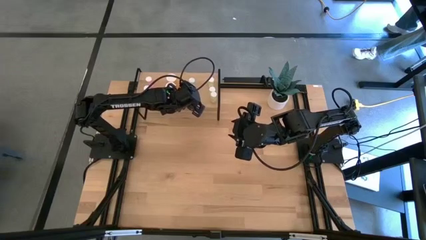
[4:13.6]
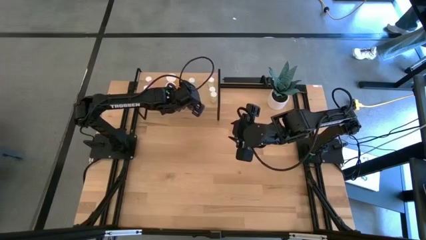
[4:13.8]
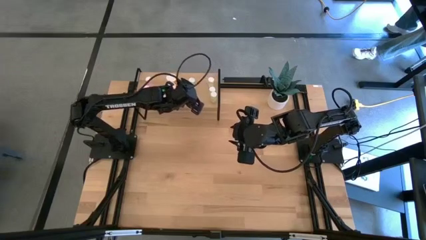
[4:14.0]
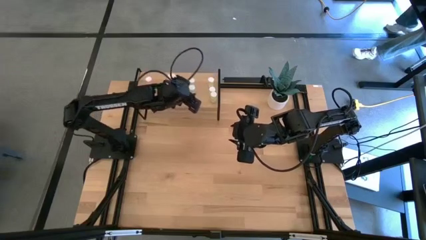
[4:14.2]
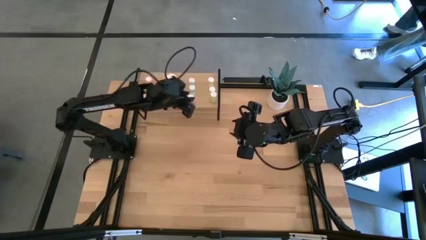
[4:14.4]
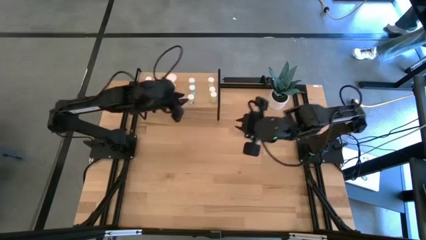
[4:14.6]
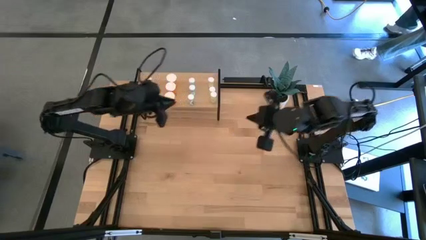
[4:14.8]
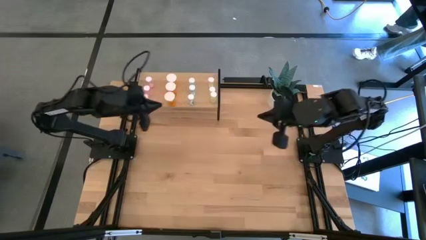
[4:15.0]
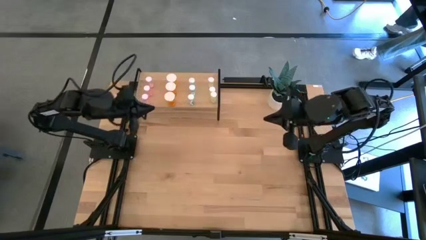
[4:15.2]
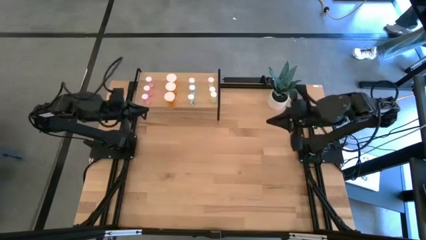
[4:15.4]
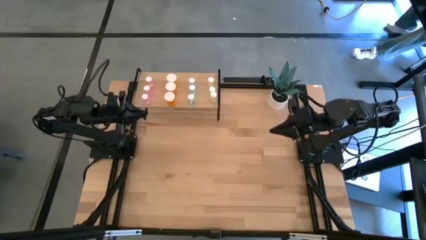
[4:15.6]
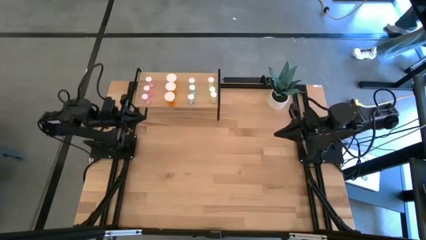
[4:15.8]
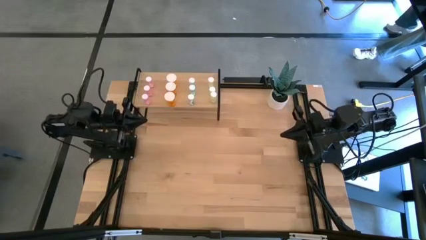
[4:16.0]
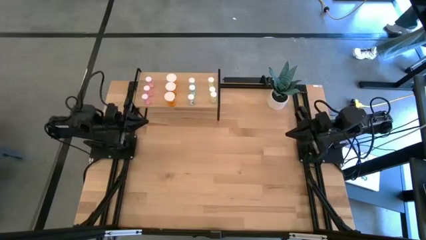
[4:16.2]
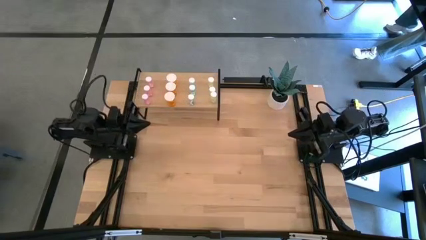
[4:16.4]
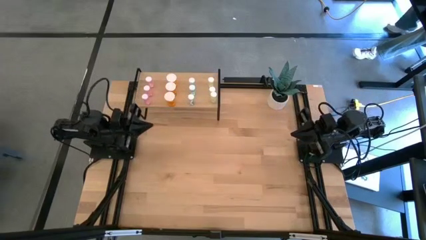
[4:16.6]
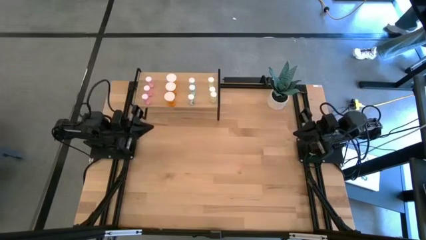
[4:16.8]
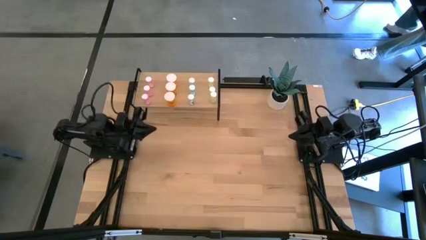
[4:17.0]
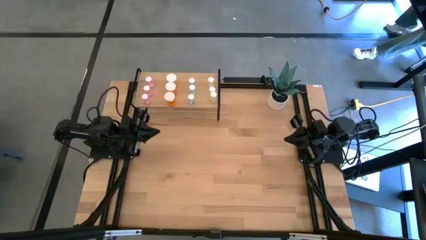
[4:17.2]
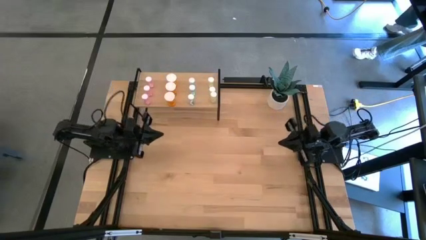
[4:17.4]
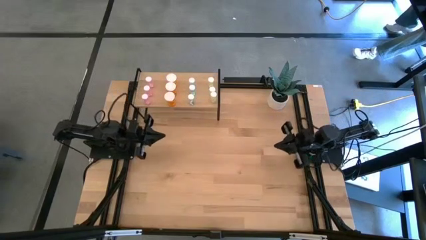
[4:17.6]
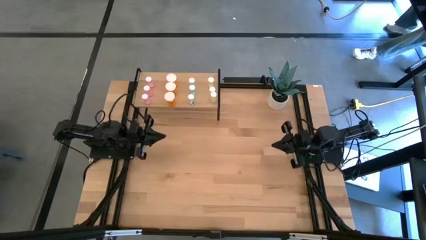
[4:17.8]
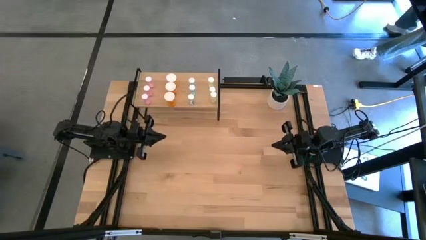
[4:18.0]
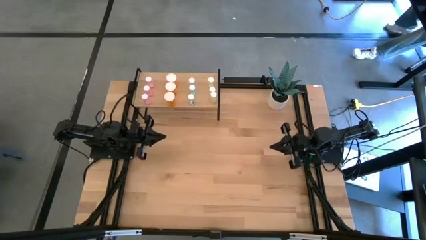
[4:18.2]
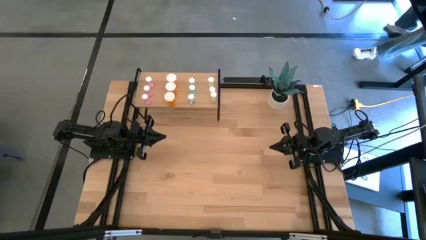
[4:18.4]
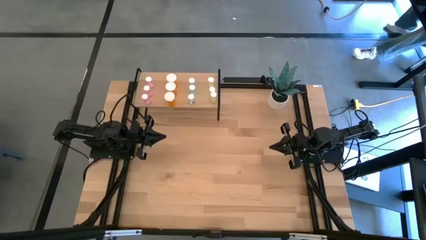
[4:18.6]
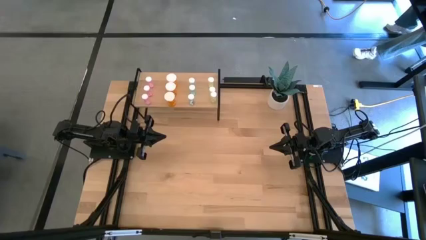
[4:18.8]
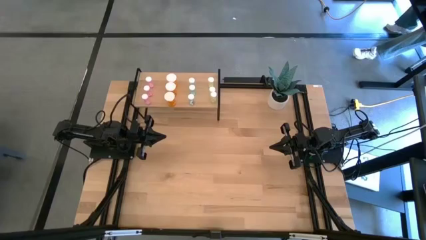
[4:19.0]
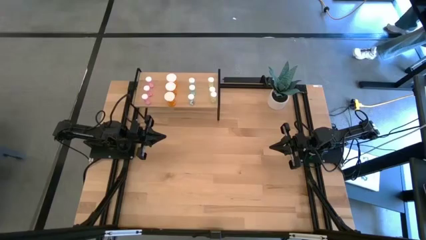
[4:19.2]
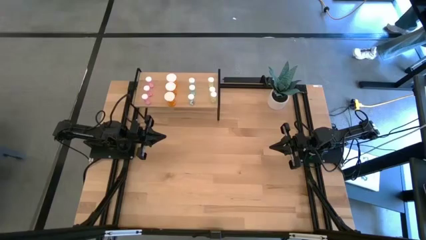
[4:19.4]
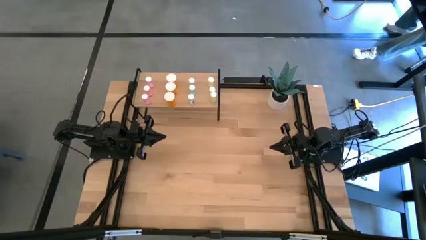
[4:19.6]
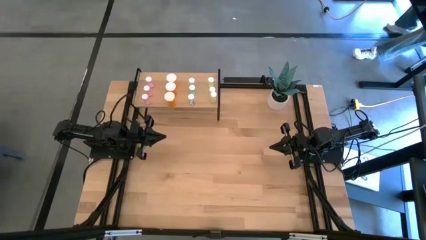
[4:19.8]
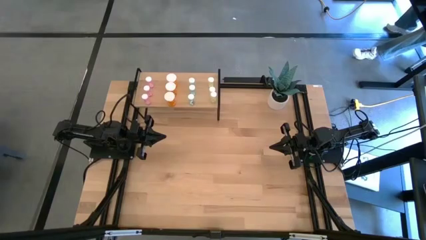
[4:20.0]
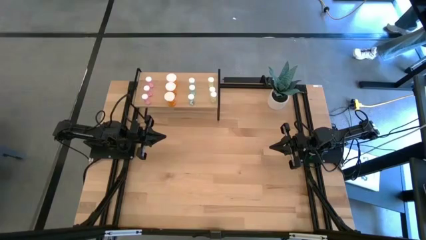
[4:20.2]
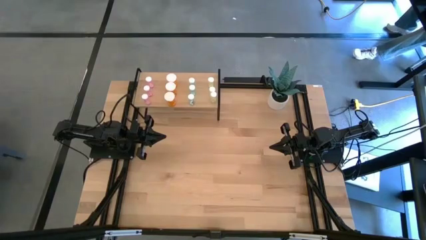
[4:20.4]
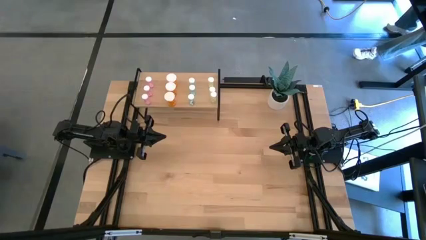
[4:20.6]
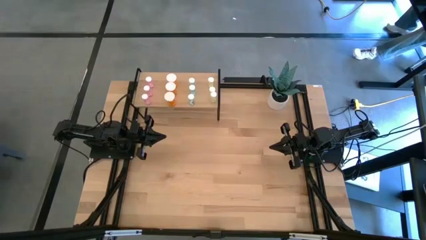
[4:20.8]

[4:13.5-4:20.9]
Task: Pick and place medicine bottles onto shelf by color
Return to Home Position

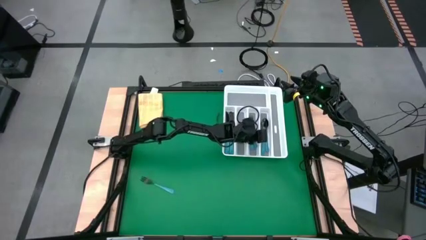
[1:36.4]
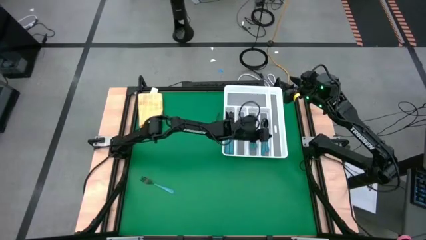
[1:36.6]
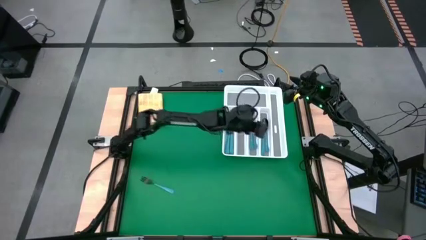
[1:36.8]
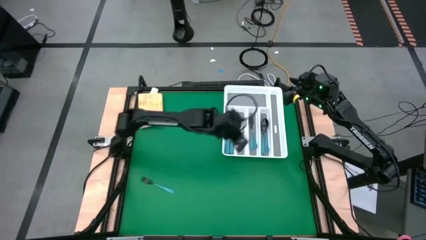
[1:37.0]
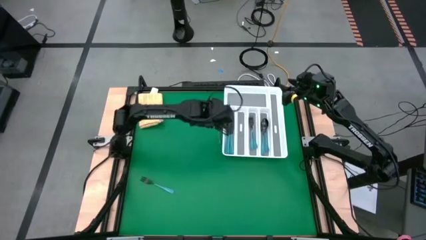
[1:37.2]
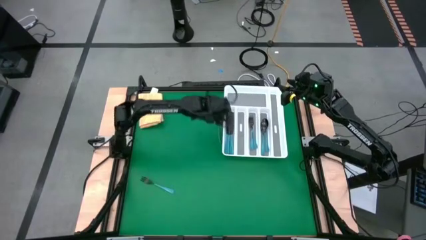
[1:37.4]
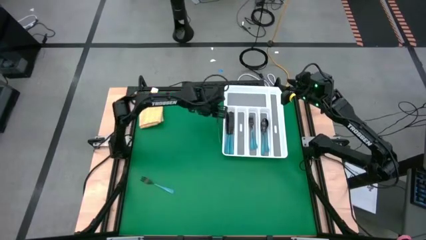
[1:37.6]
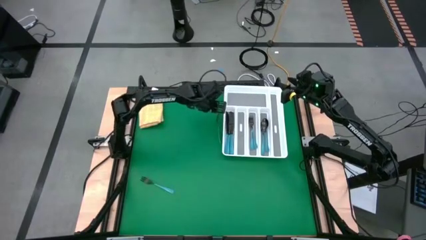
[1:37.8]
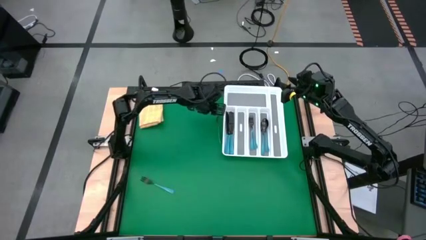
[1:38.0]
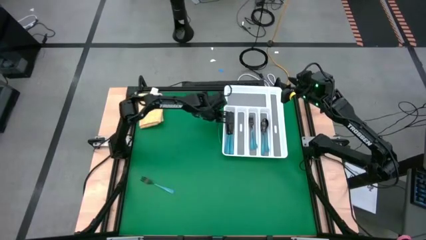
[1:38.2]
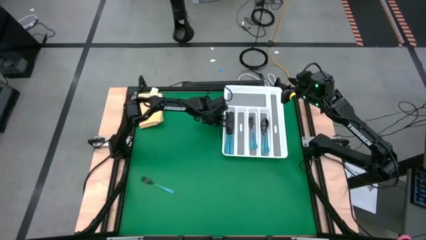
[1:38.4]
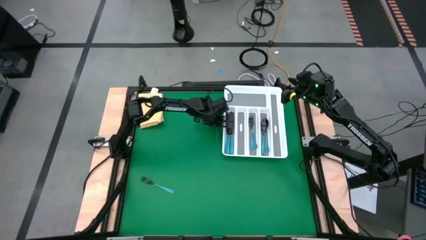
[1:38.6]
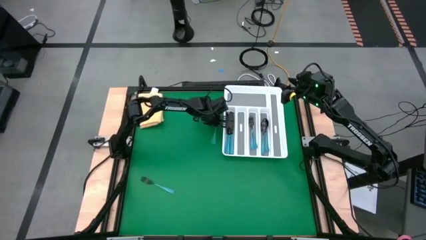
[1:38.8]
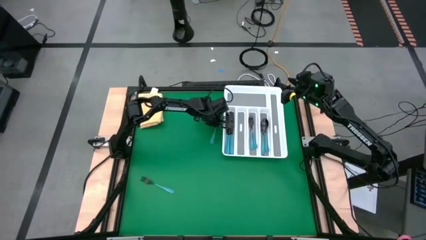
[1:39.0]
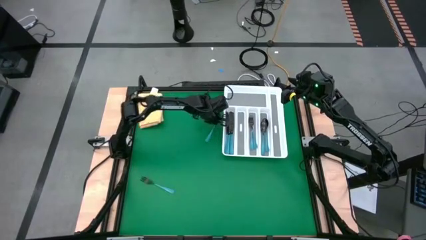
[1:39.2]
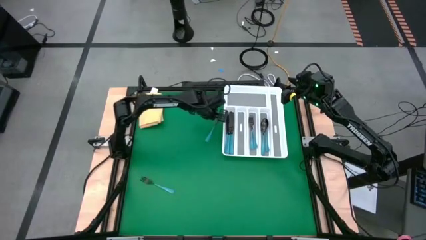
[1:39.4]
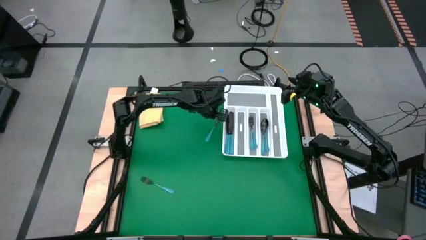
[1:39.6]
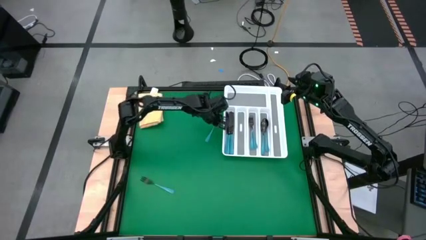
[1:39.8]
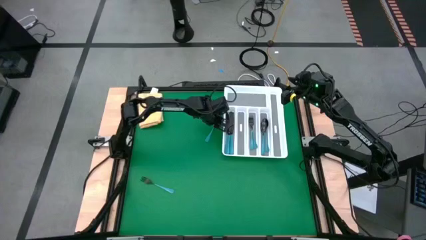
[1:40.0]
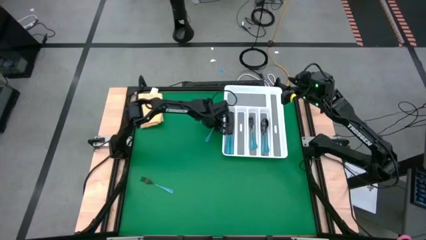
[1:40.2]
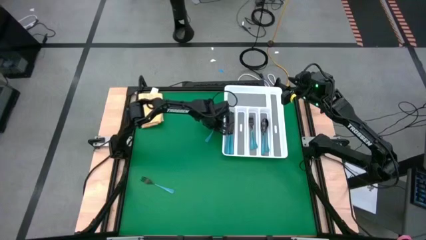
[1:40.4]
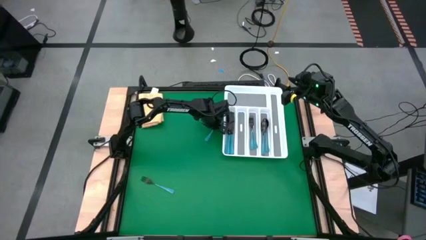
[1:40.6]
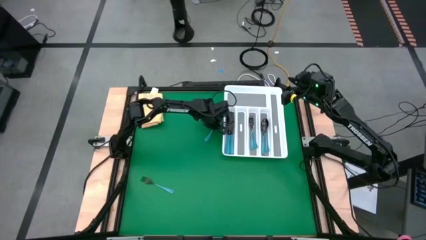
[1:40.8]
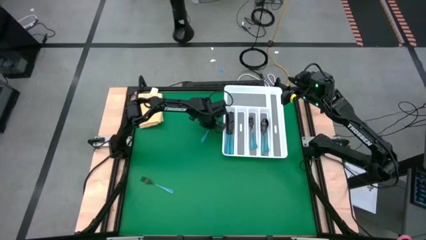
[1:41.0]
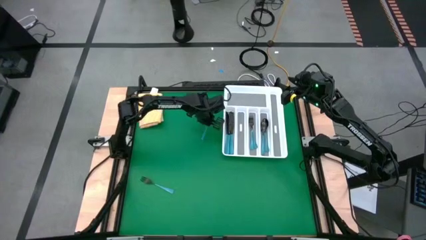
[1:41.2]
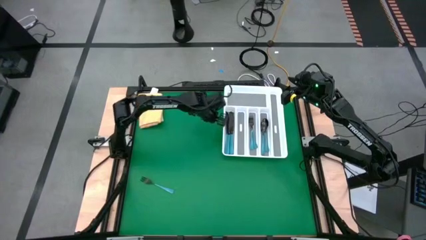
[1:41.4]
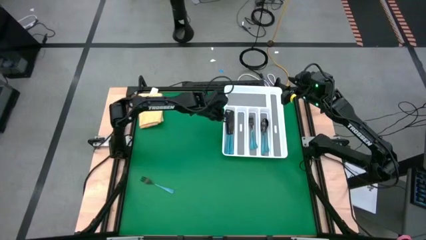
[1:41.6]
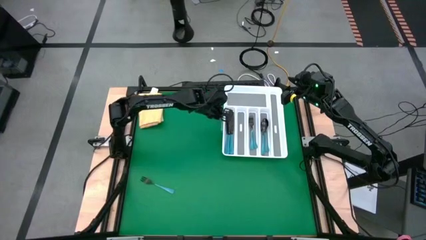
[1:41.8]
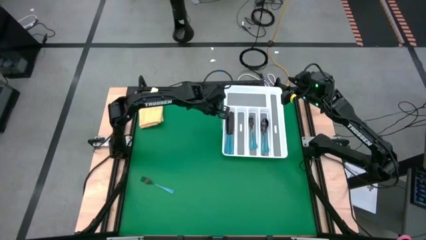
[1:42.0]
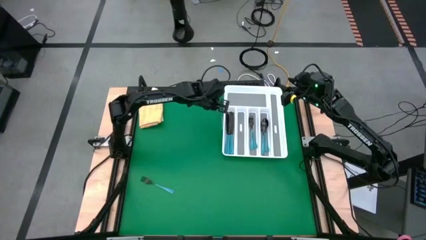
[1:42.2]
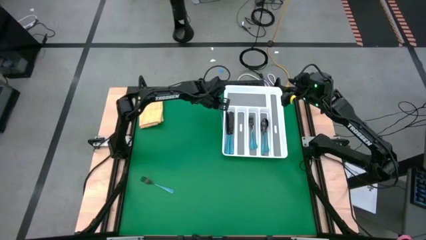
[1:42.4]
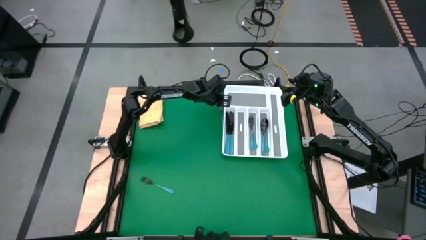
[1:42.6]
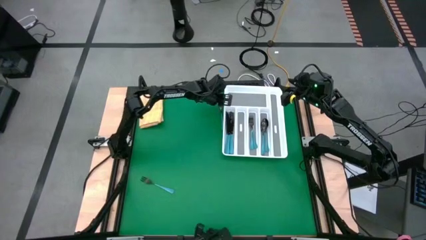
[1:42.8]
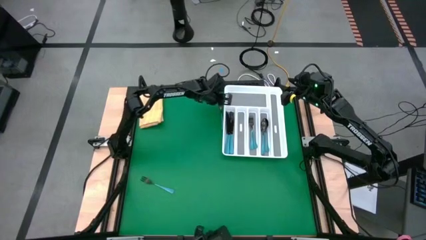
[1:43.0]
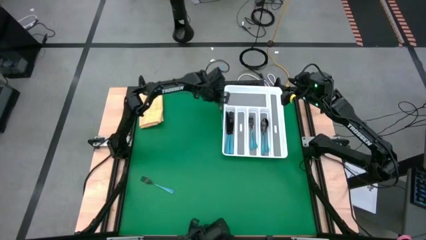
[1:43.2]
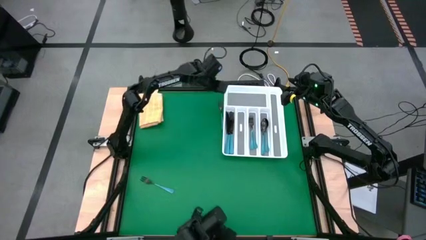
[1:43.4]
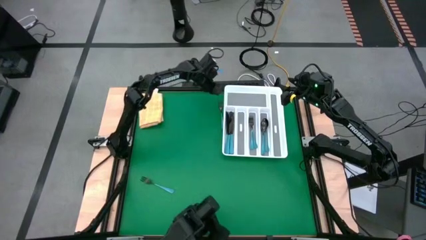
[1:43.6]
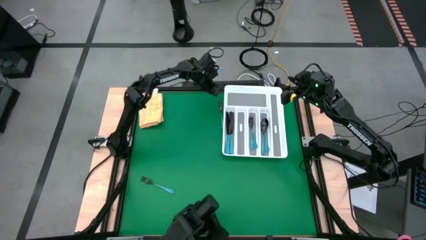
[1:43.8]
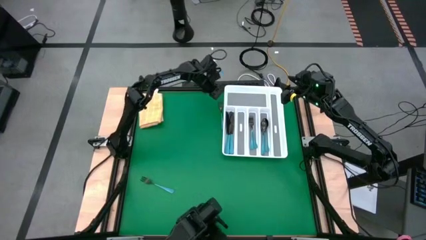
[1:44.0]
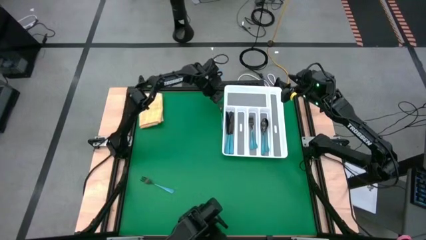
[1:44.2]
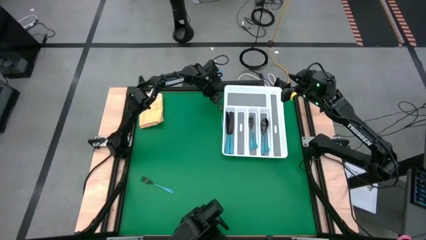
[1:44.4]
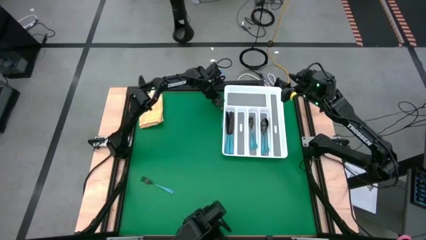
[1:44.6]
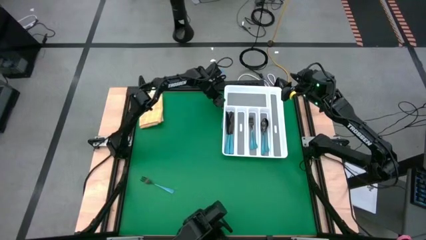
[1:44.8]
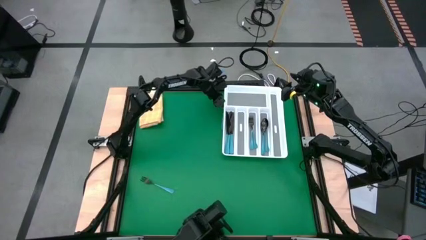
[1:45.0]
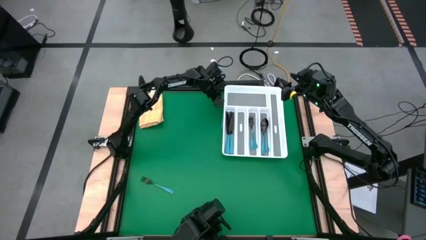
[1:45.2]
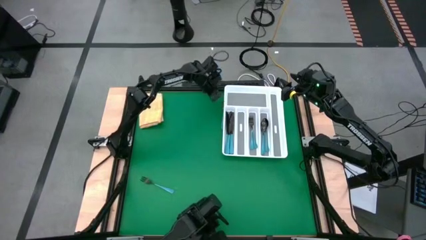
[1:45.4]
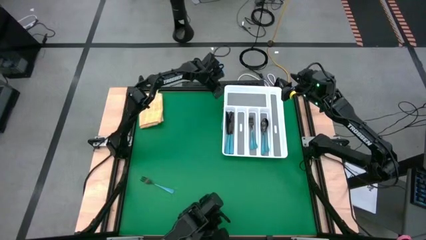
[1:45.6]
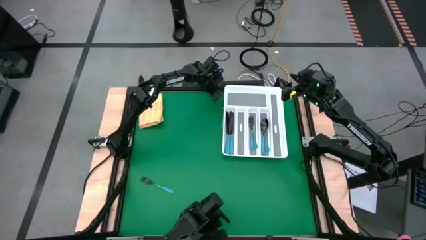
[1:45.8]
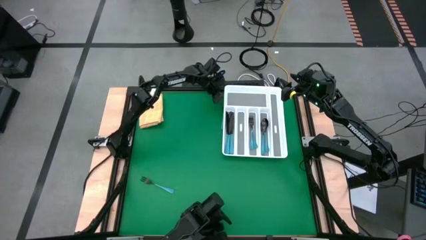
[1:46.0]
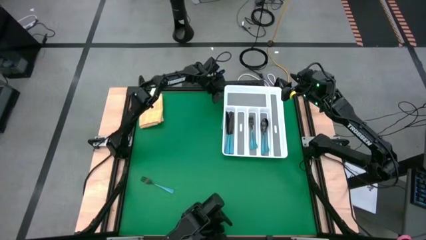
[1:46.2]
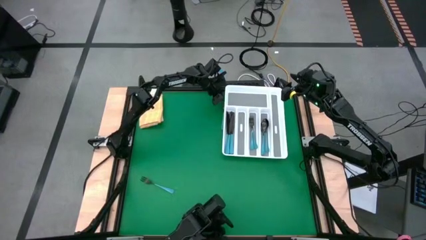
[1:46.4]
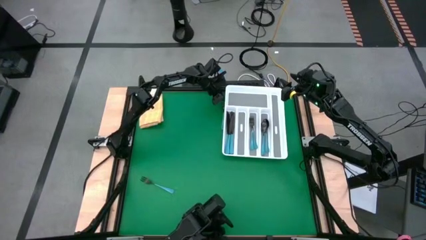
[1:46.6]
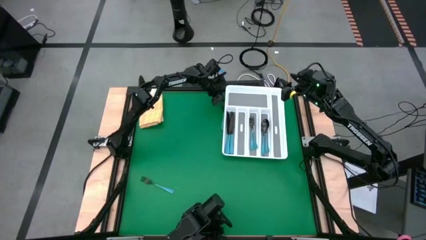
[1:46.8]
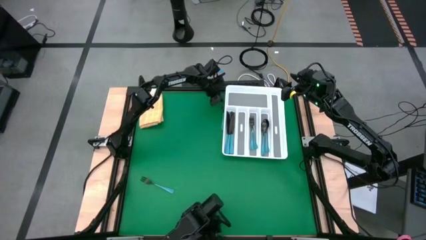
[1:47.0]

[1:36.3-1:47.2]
Task: Sort silverware
Put the blue fork into the white cutlery tray
